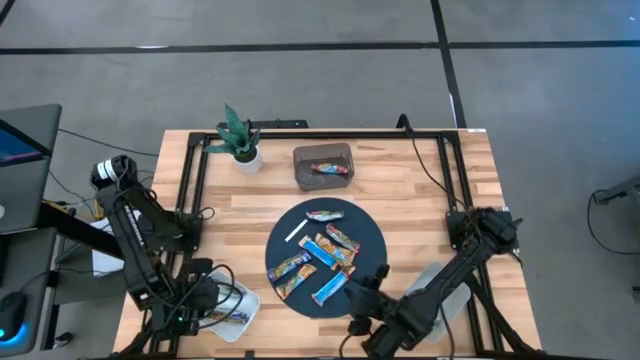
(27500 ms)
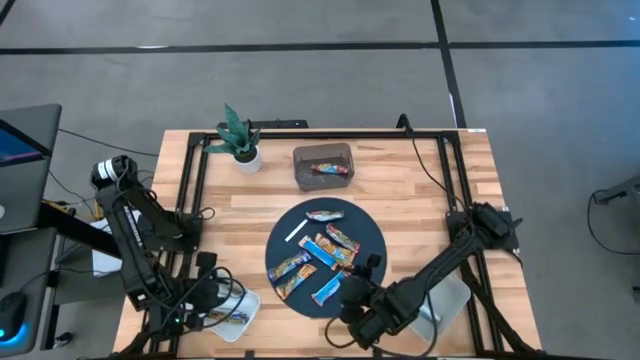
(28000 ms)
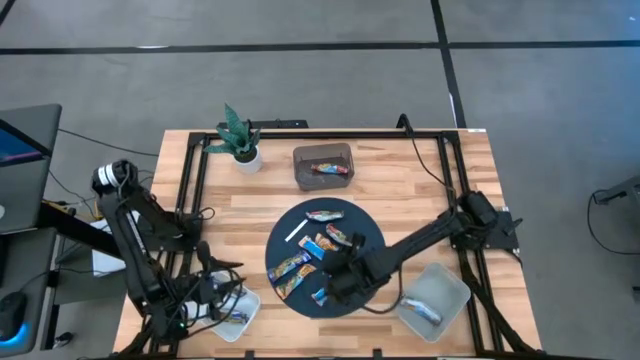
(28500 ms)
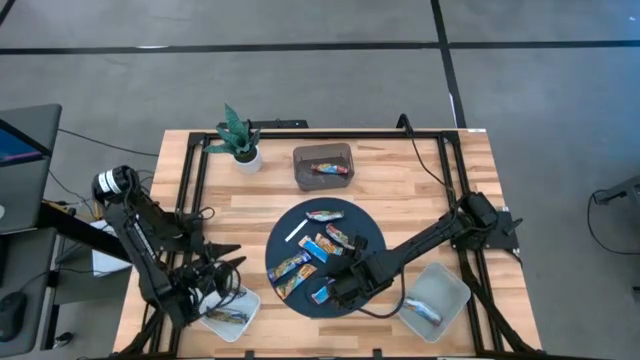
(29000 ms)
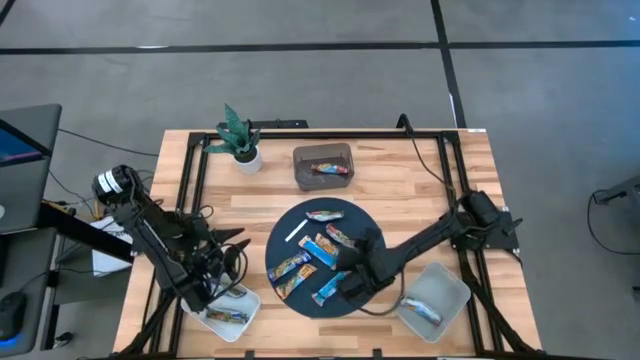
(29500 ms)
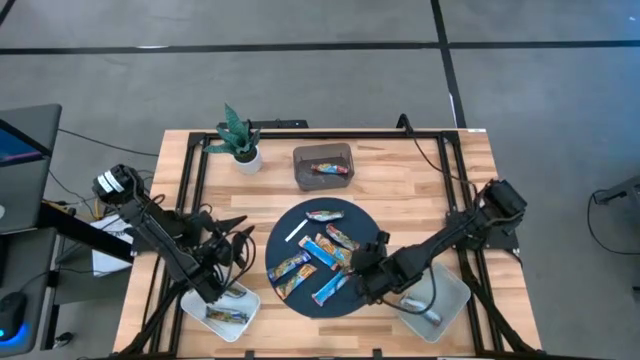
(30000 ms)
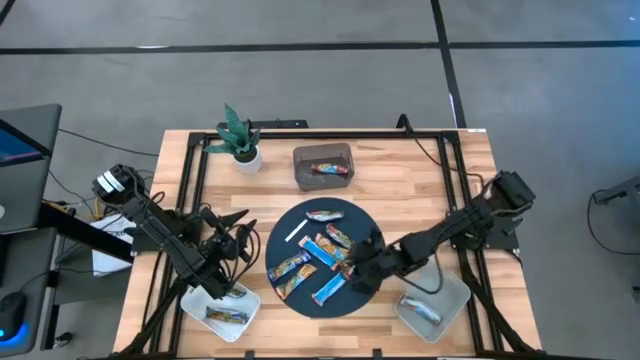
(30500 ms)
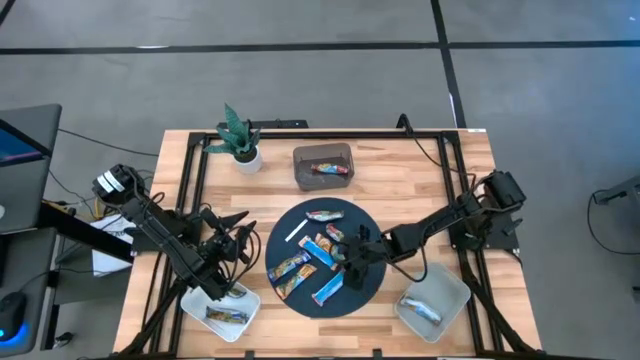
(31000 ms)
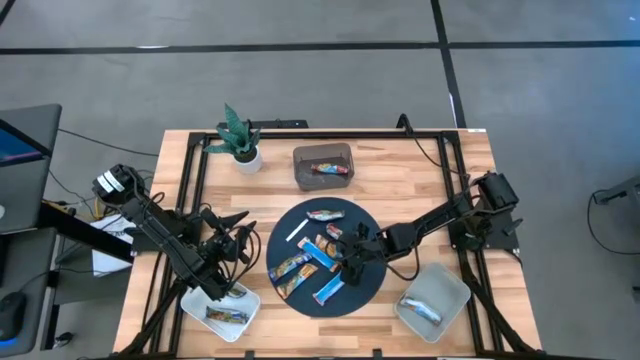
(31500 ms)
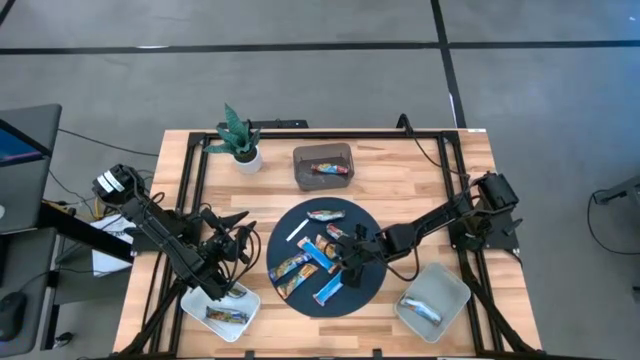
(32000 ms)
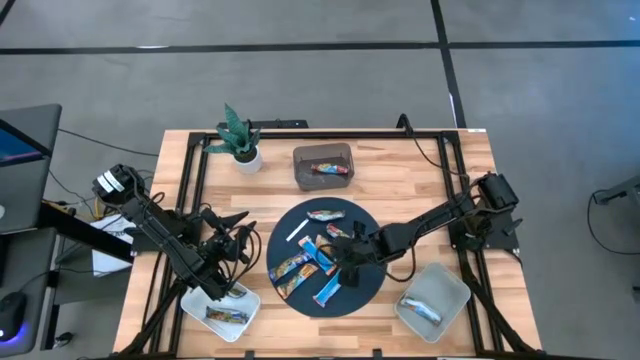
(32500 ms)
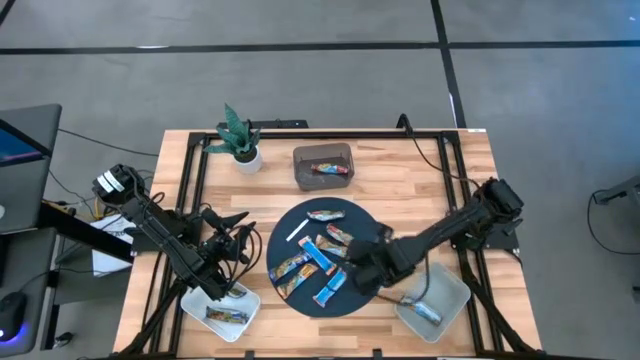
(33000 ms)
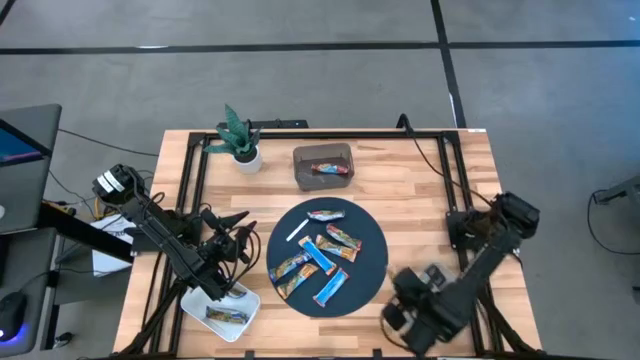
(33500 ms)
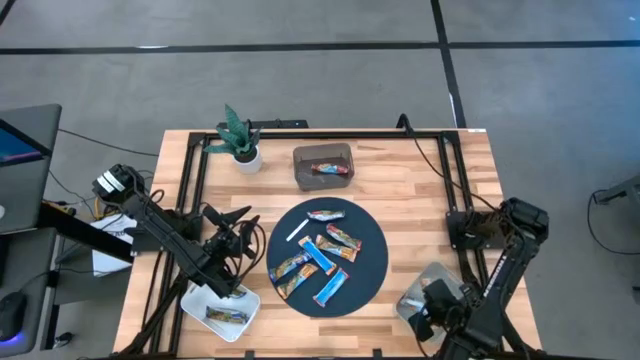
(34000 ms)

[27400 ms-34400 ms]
Task: Pick and place Granola Bars by type
Put the yellow granola bar into the gray bin

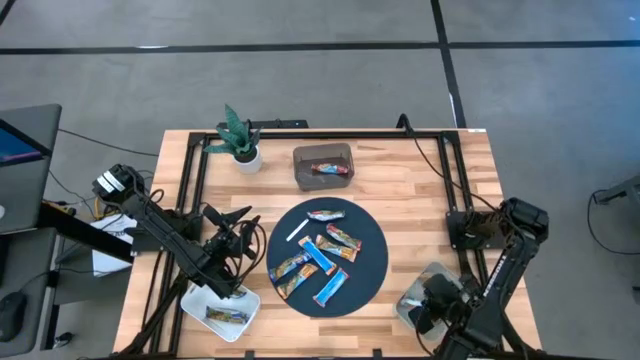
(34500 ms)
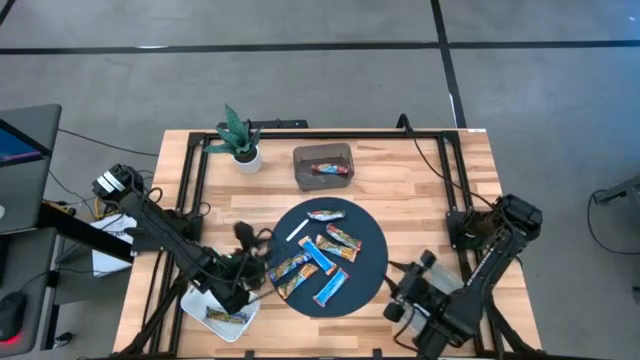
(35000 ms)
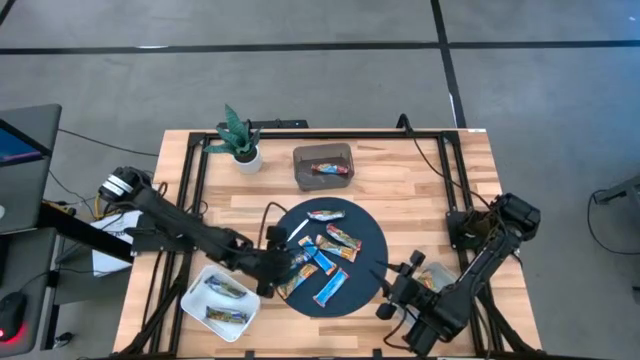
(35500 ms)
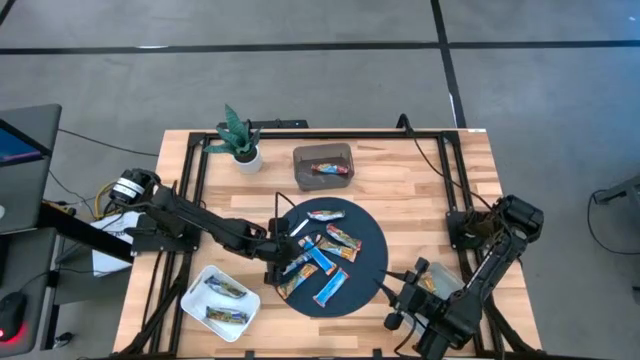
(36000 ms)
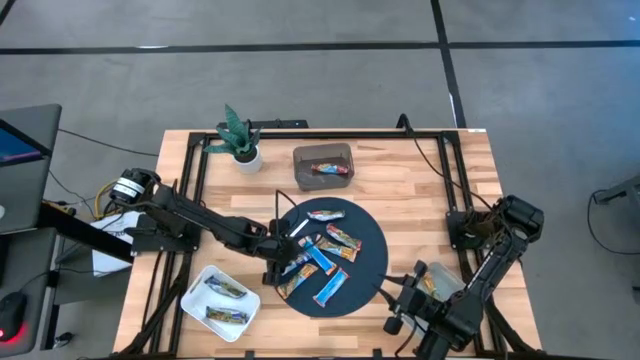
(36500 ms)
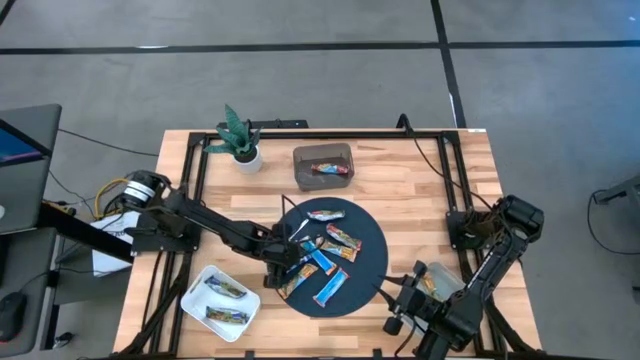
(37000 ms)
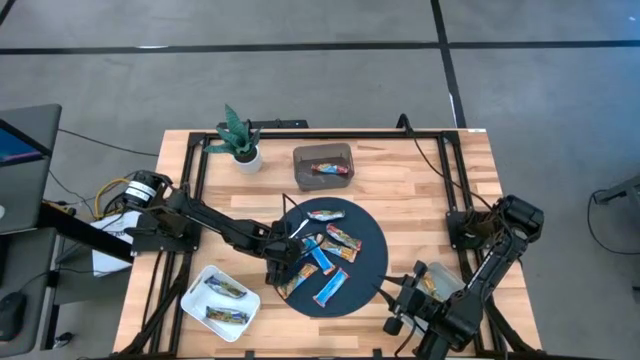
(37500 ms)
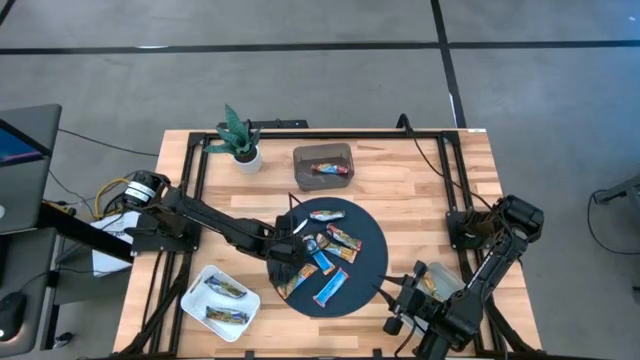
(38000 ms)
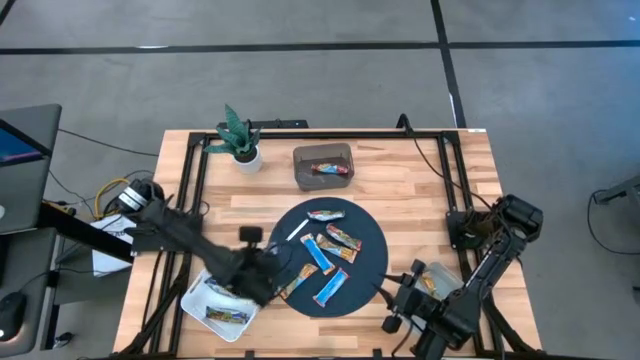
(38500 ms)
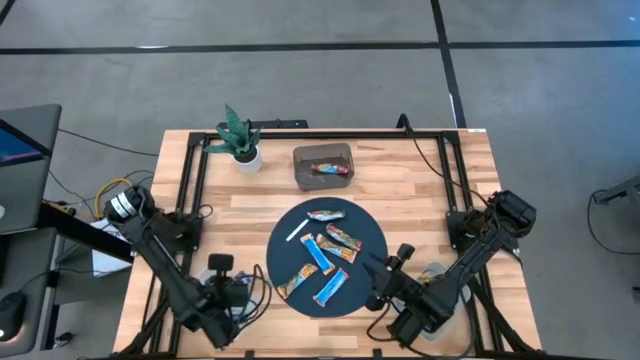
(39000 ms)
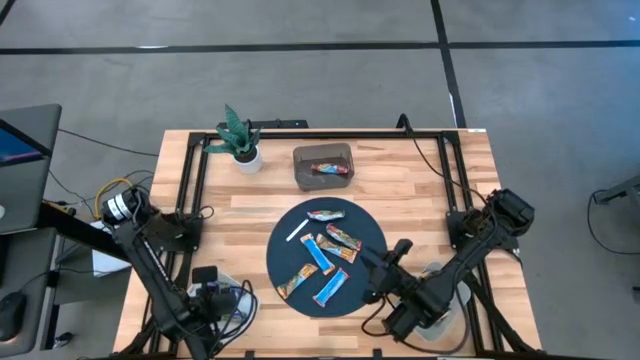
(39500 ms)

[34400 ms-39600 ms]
Put the blue granola bar into the white bin

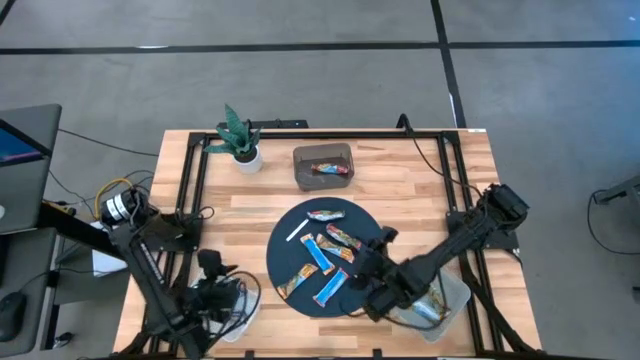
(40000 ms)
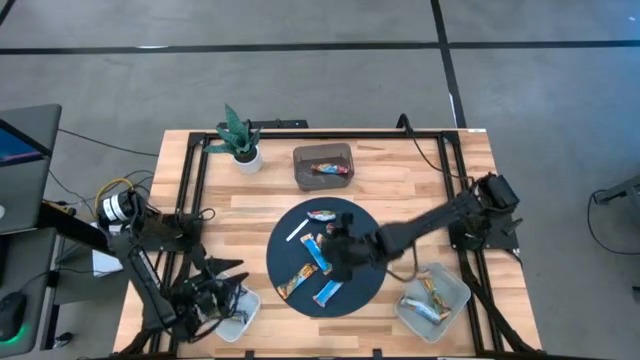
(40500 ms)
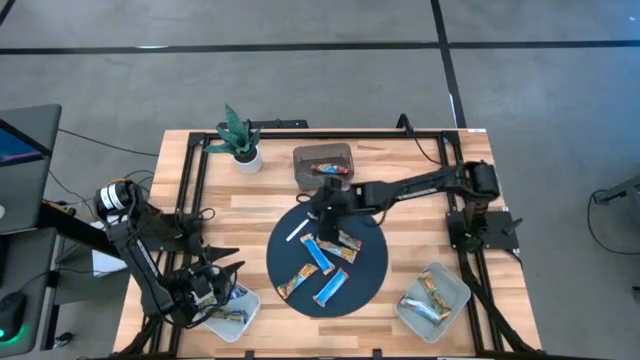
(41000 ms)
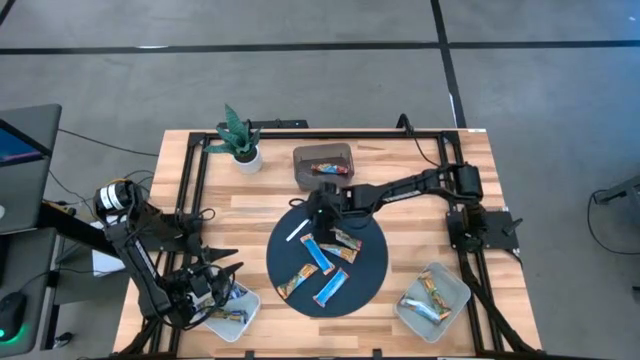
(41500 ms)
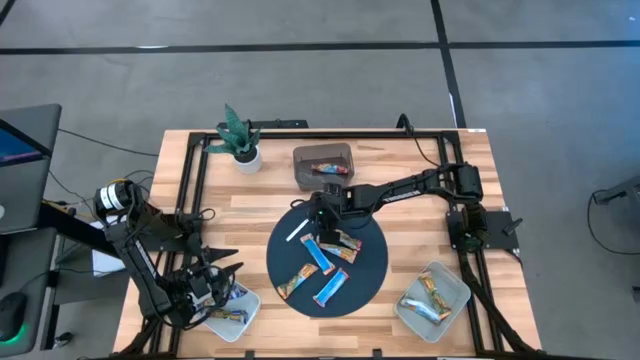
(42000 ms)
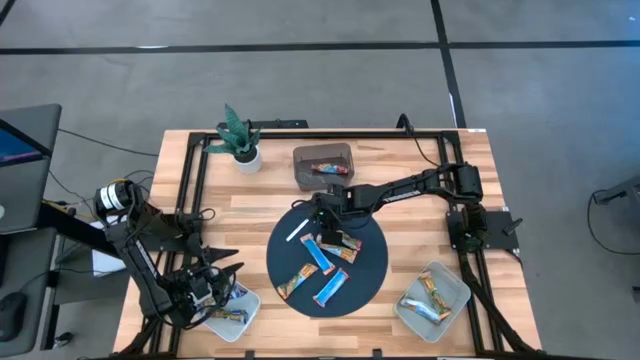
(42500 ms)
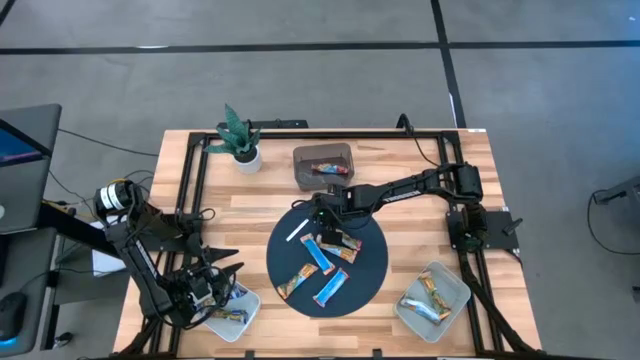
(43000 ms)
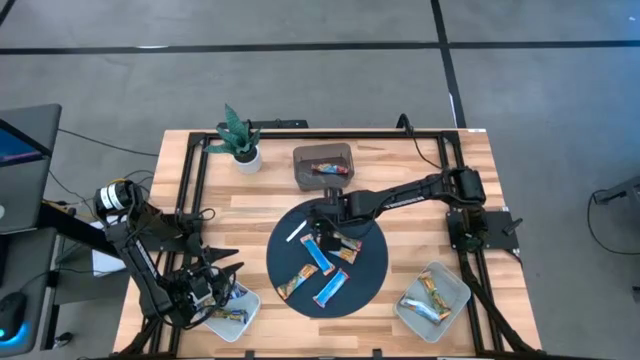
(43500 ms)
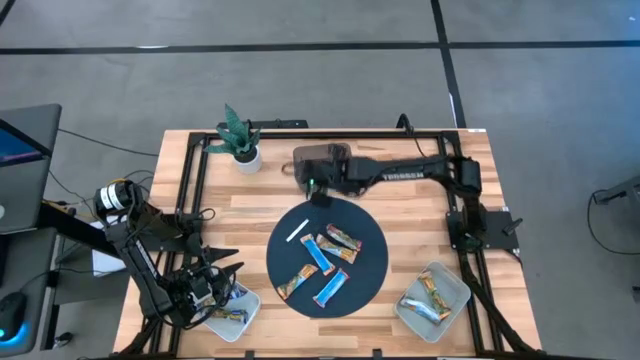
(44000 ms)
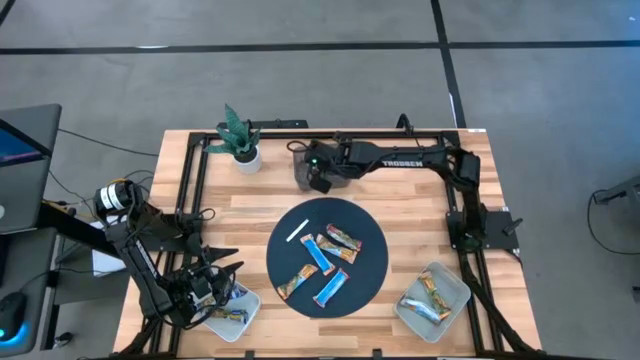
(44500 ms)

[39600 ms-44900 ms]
Put the red granola bar into the black bin

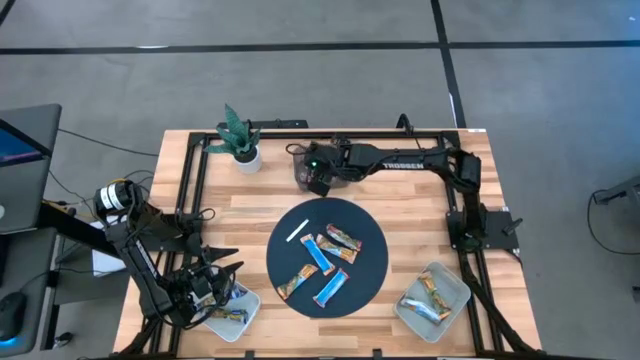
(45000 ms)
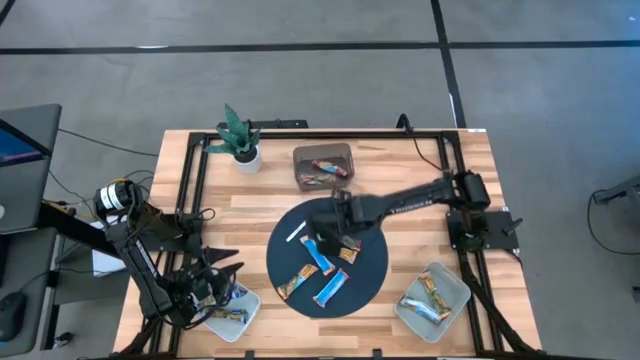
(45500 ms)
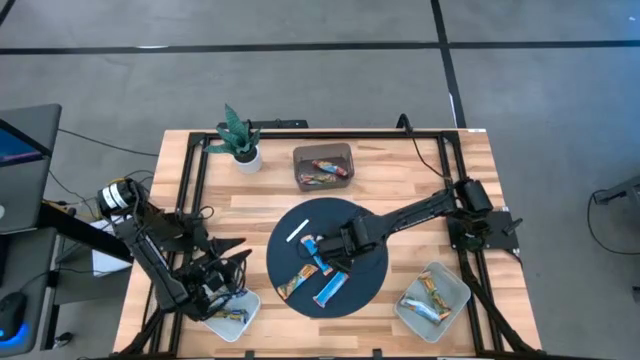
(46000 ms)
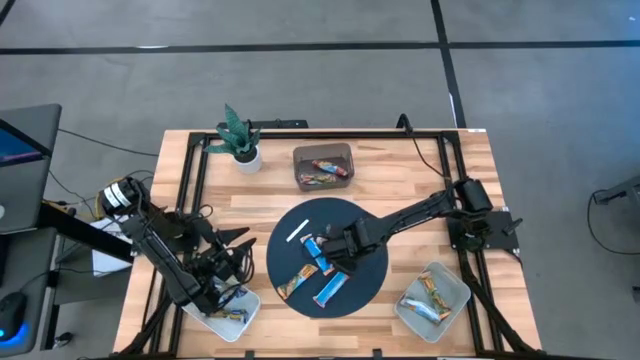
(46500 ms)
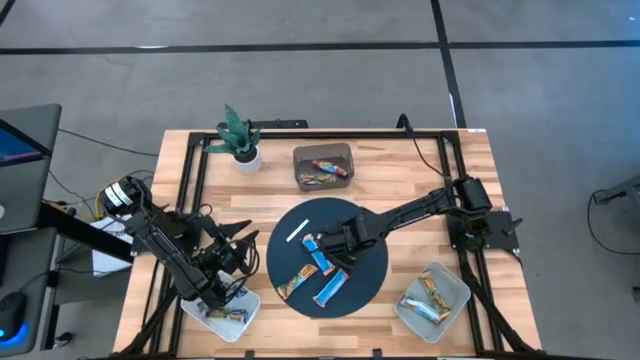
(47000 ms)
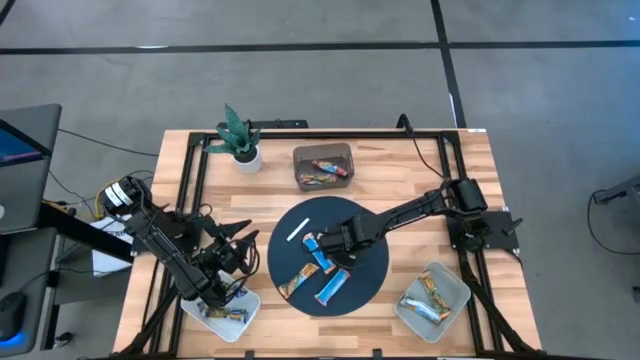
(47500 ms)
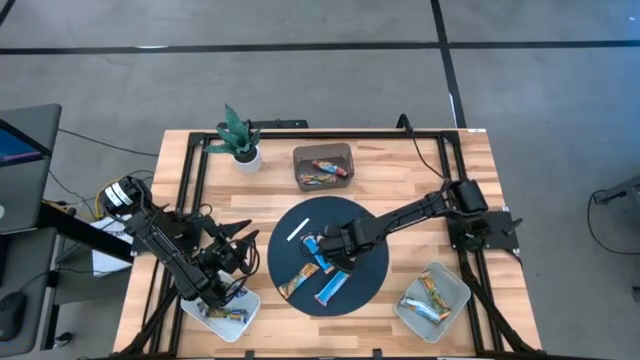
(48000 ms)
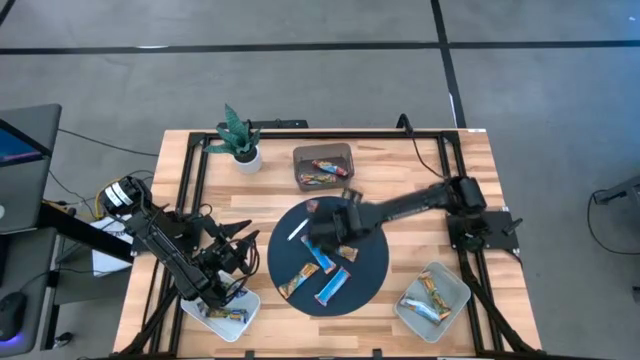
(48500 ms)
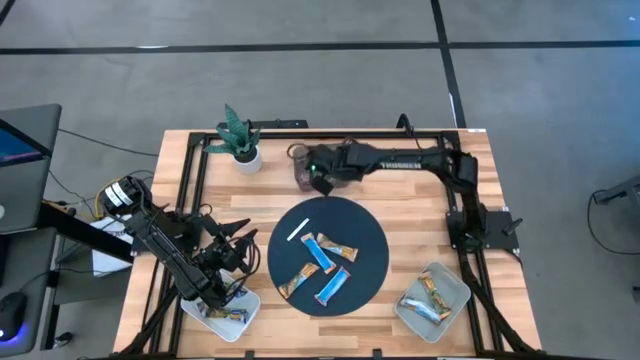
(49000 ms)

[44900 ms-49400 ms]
Put the red granola bar into the black bin
